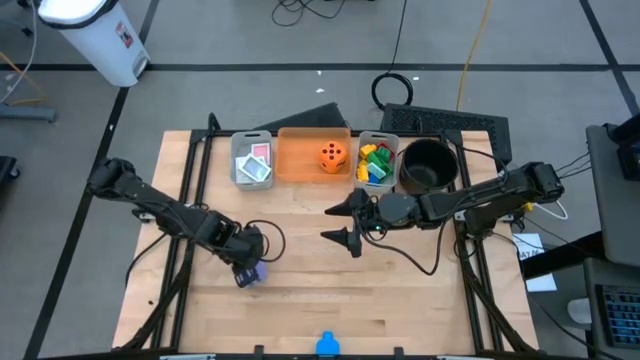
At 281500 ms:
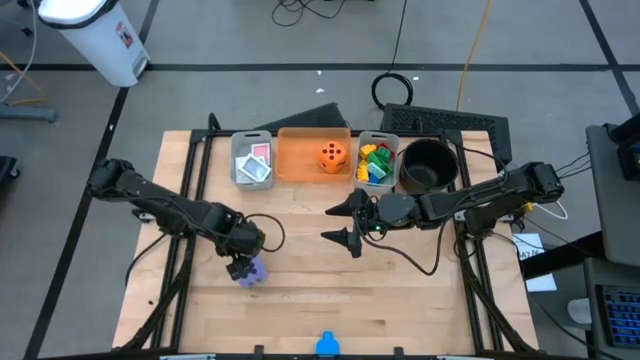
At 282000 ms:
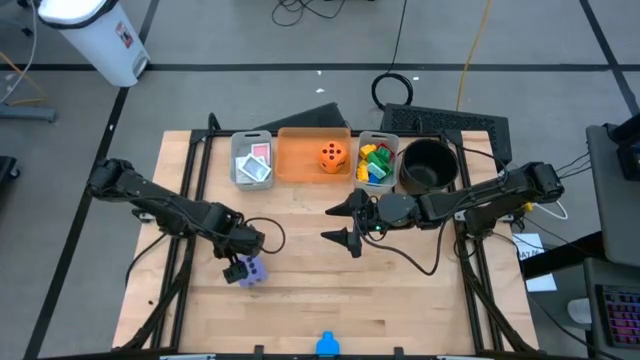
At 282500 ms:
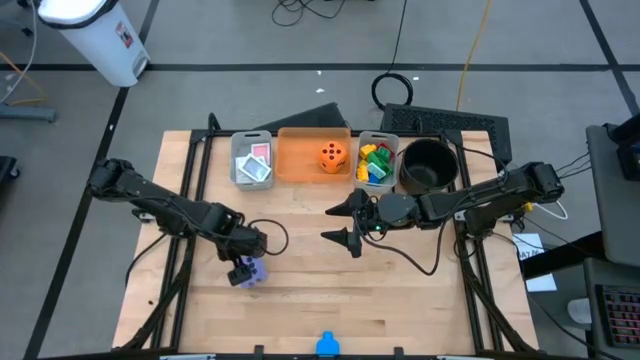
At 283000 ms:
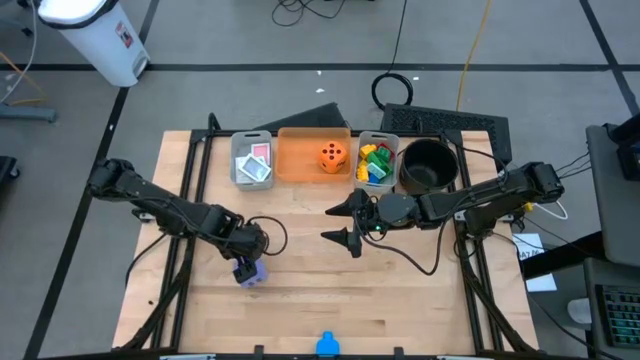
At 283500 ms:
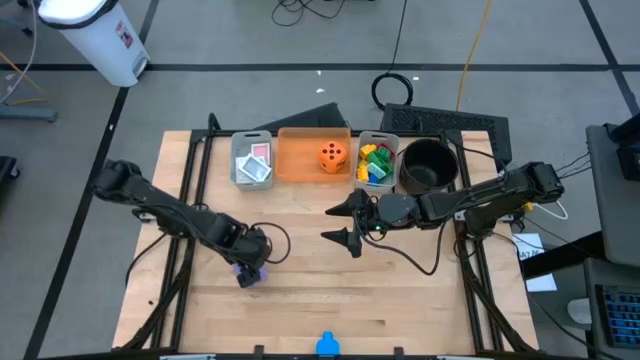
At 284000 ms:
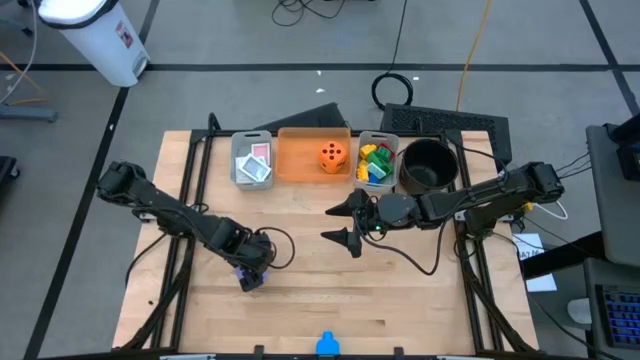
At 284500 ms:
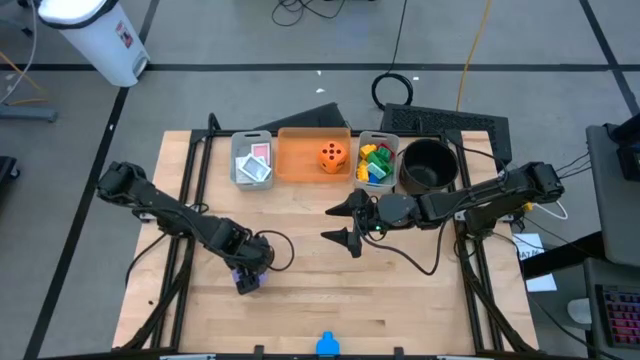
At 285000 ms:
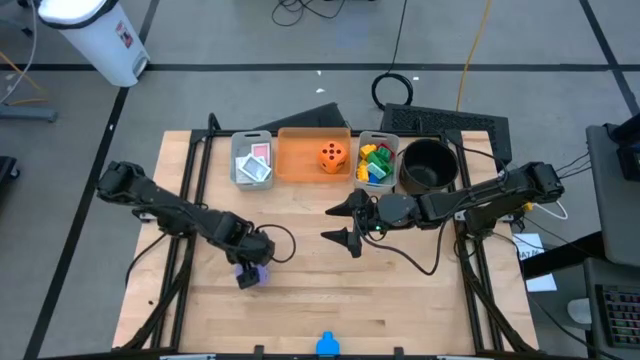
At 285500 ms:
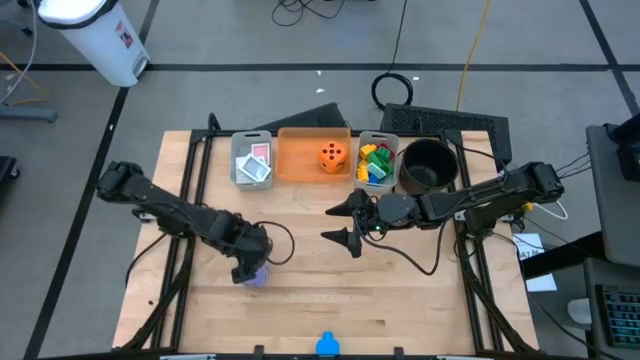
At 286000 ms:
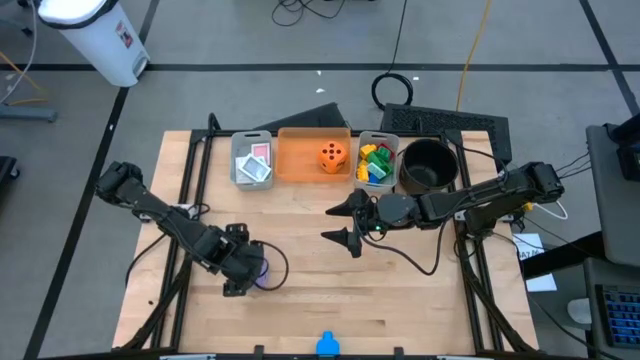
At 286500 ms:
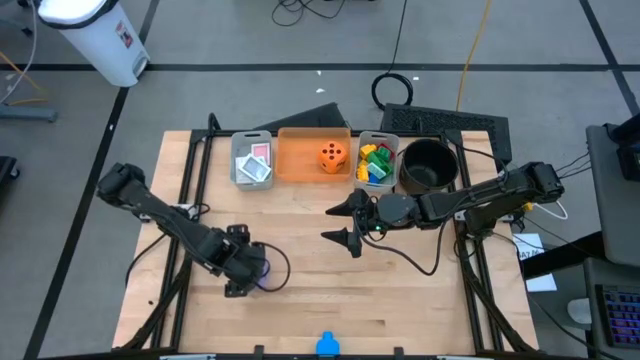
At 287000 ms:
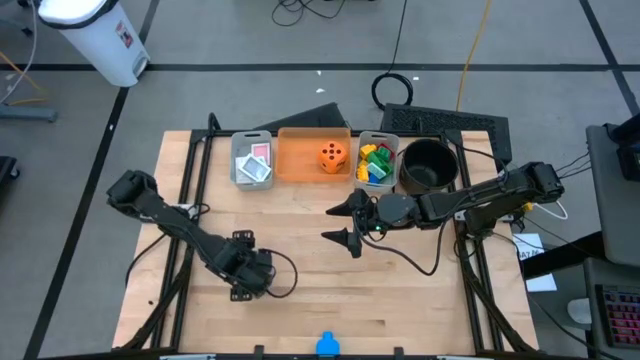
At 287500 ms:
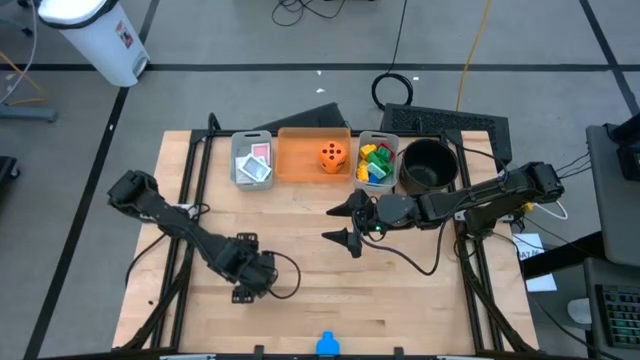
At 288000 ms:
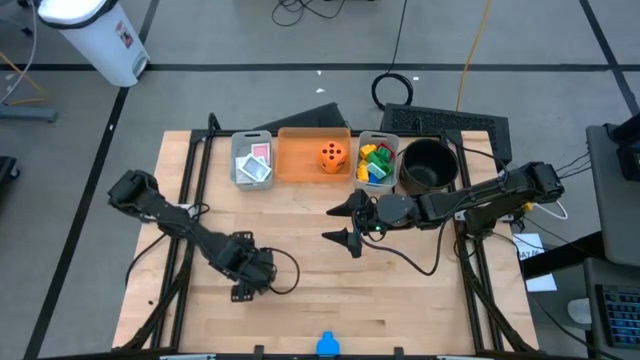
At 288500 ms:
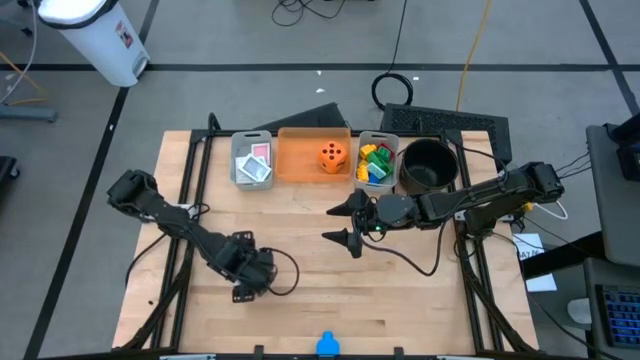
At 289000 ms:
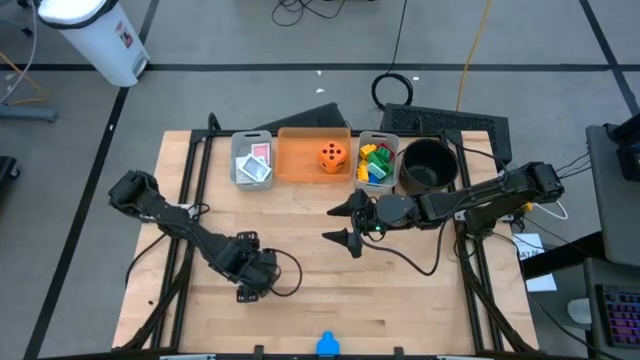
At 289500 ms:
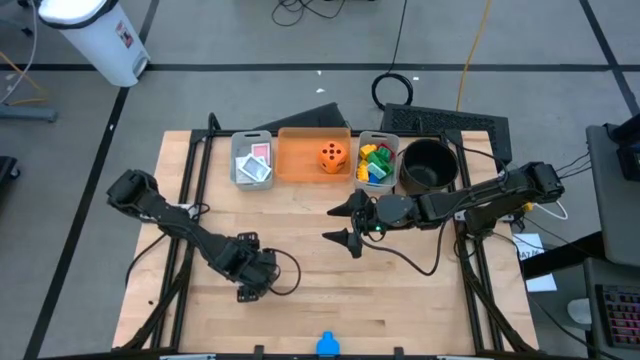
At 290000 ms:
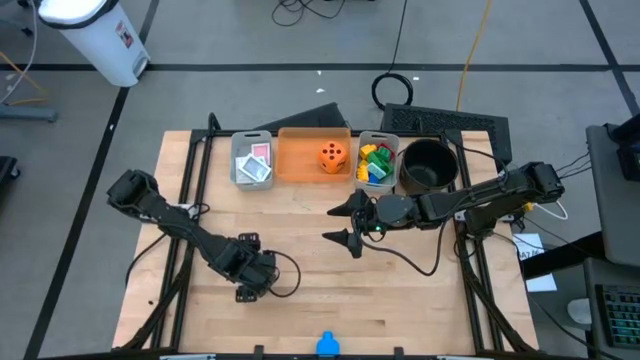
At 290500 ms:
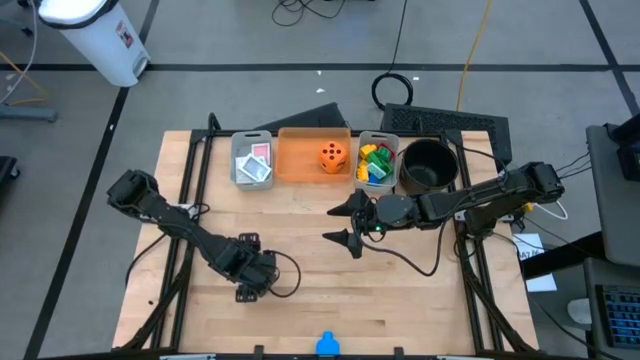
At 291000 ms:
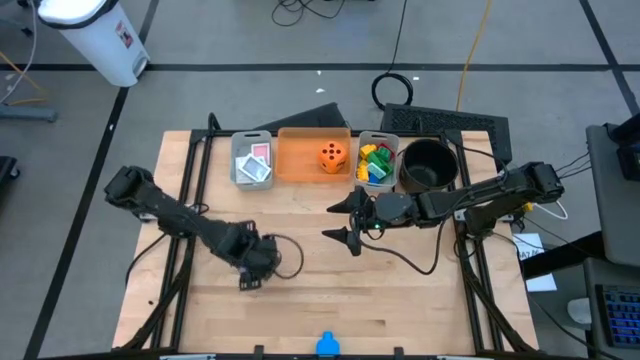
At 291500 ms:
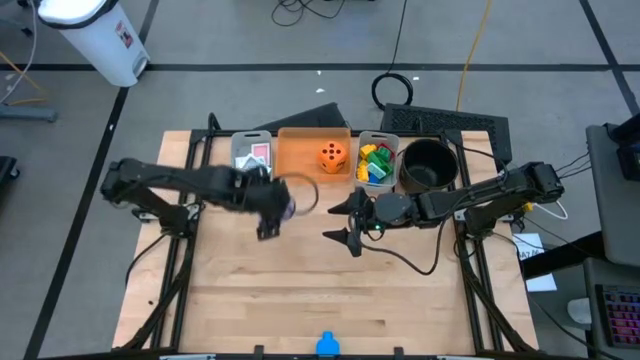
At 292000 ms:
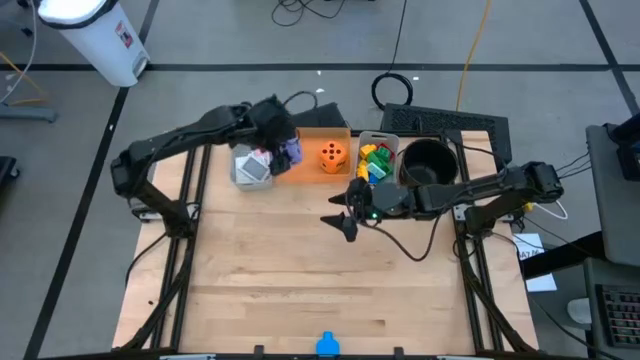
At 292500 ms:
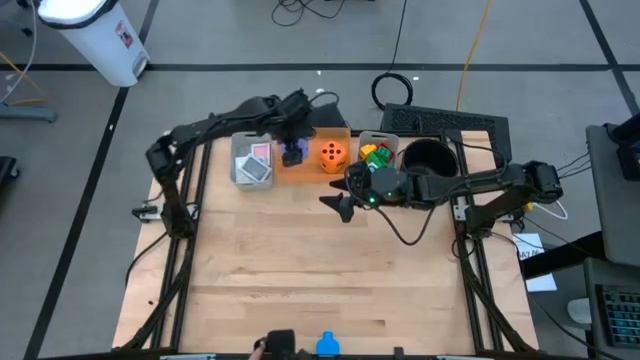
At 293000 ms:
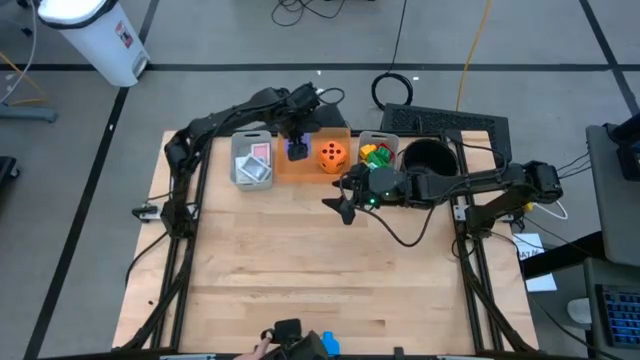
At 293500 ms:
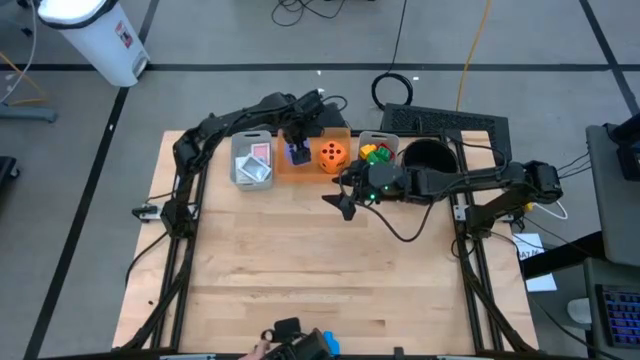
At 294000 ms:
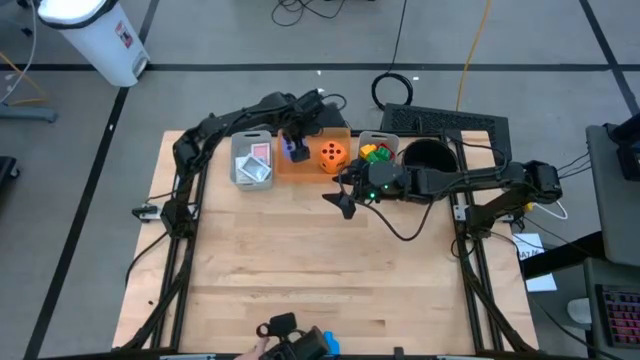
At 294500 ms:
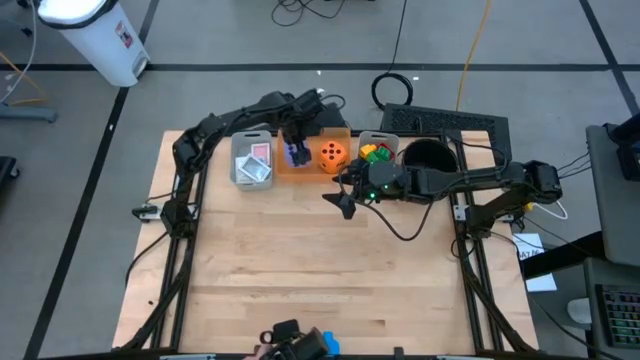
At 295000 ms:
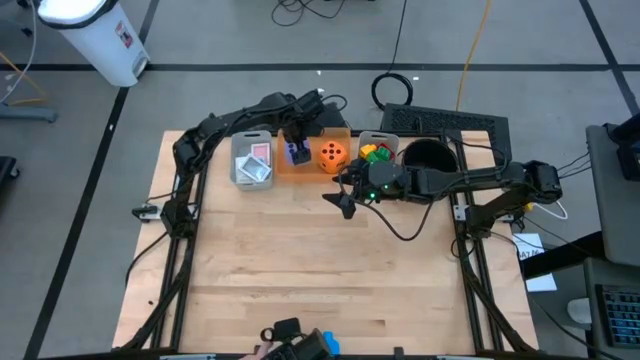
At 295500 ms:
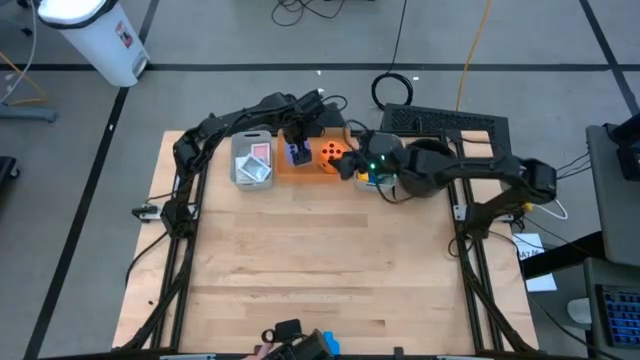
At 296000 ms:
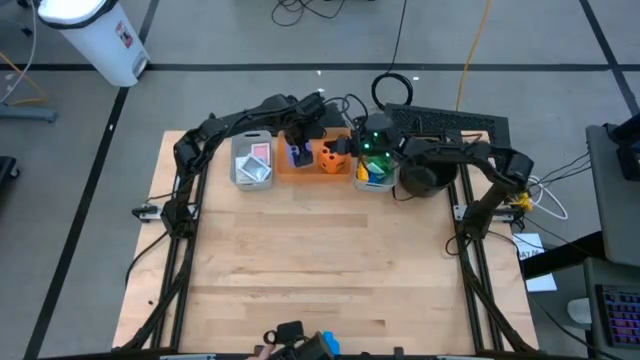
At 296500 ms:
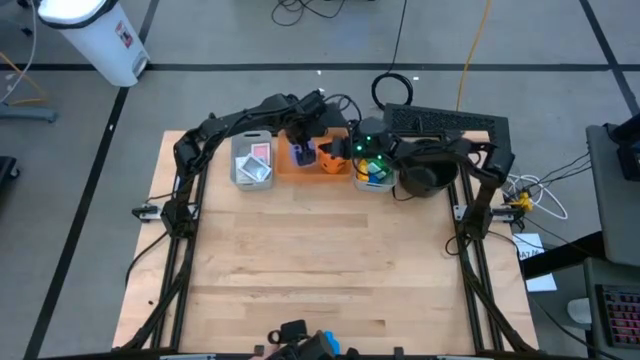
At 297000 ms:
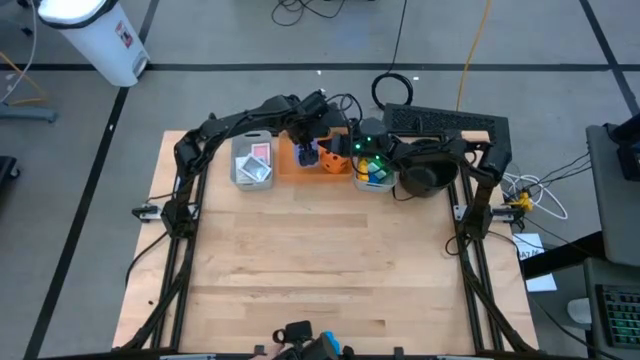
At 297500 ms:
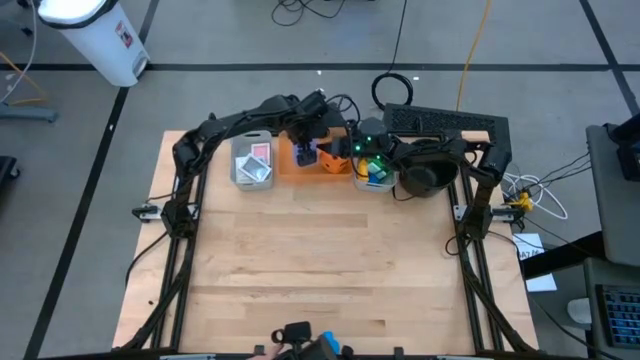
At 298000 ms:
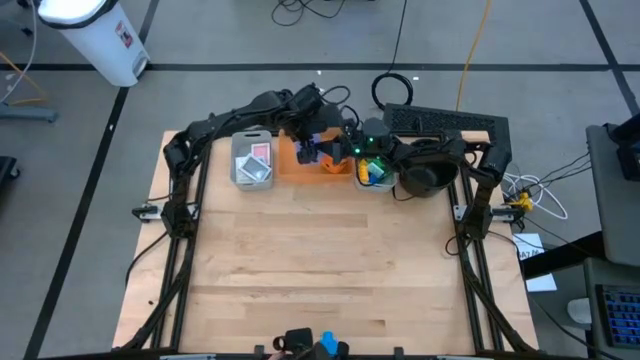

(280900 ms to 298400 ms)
Task: Pick & Place Toys
Put the purple dice into the orange bin

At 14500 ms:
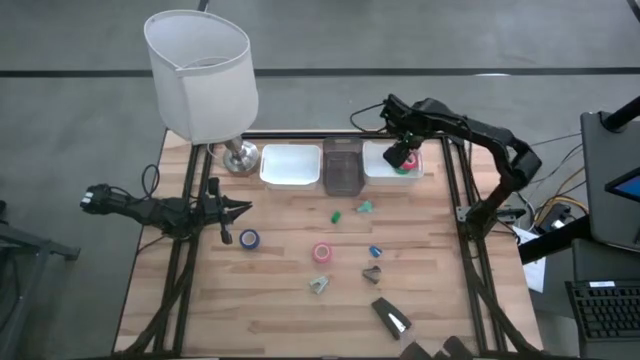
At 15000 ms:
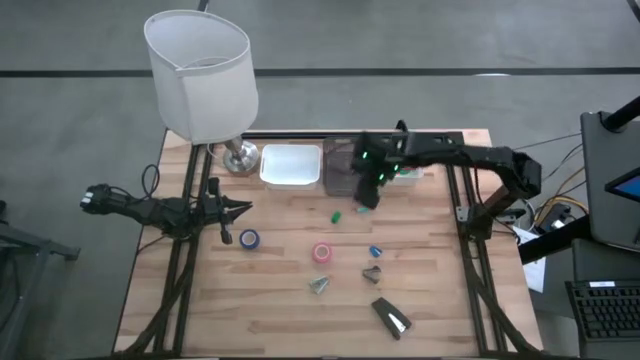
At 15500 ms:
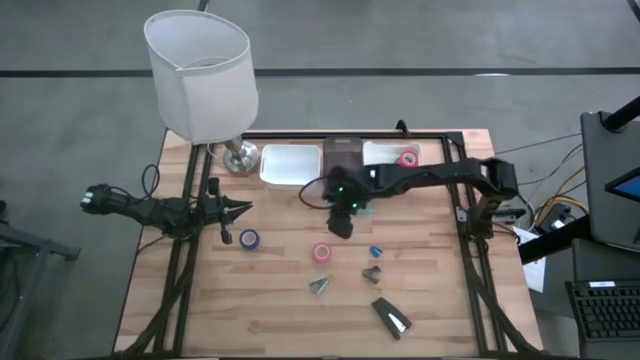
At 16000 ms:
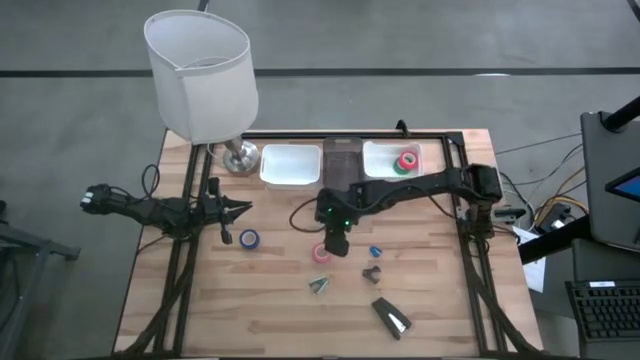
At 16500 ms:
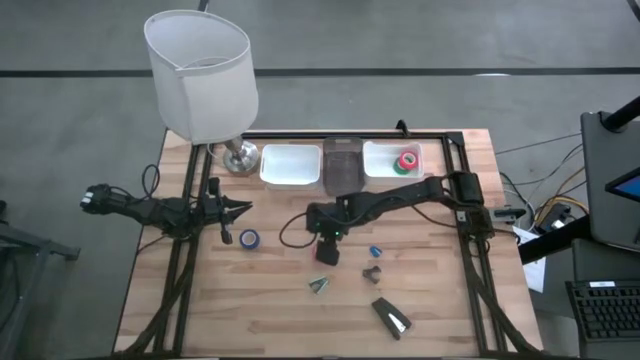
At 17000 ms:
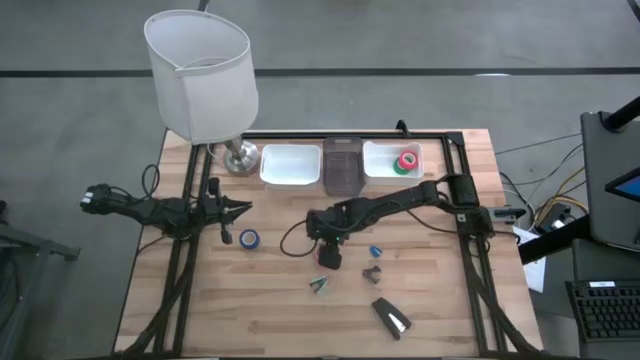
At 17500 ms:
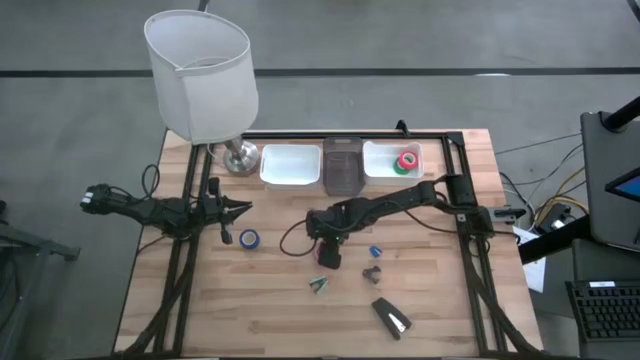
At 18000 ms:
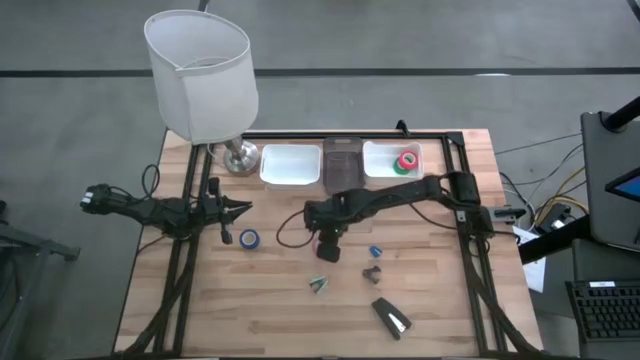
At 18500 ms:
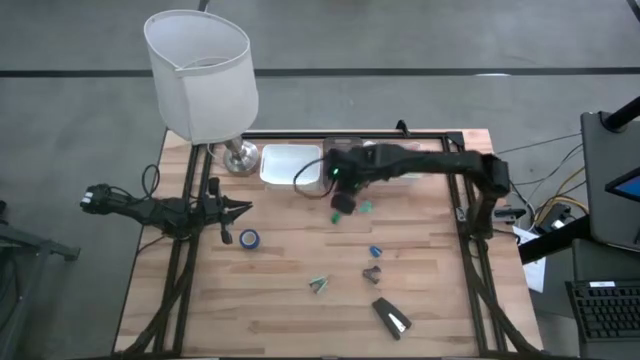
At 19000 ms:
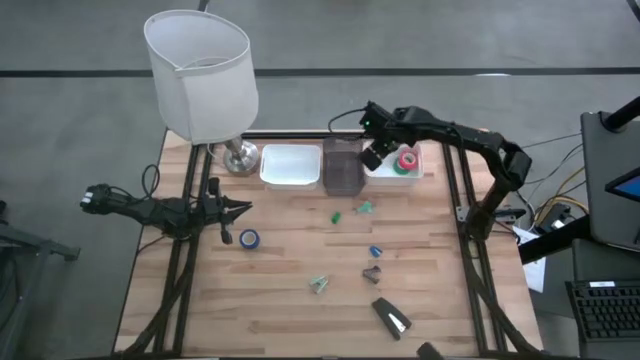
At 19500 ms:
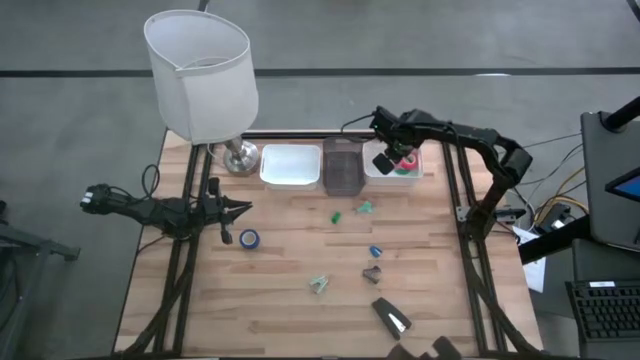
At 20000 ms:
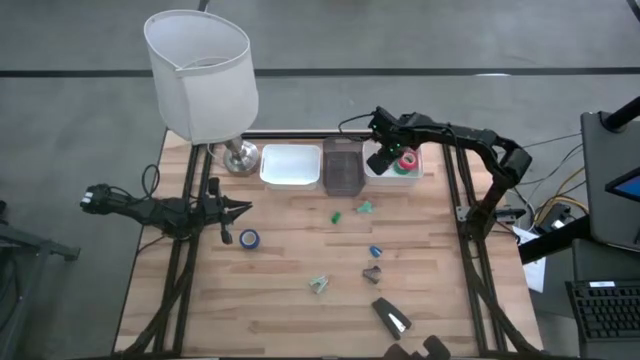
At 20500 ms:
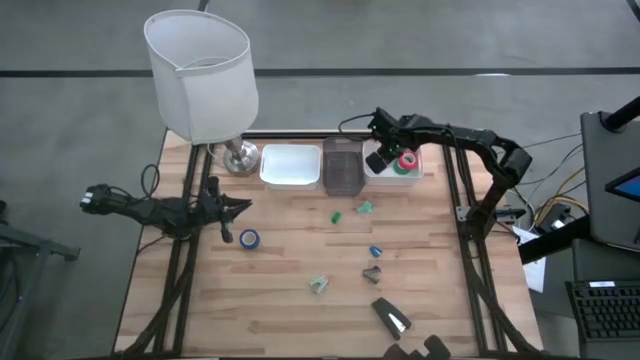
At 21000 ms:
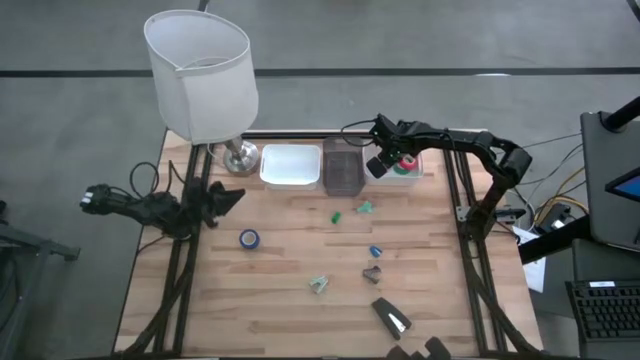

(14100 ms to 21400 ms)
Task: Pick and place Stapler, Stapler remover, tape
Put the pink tape into the right white bin
